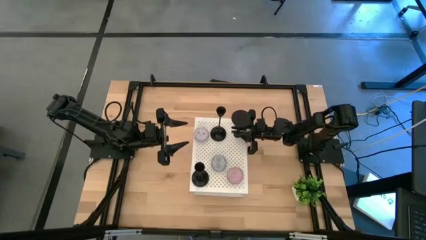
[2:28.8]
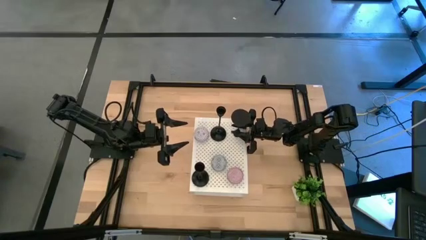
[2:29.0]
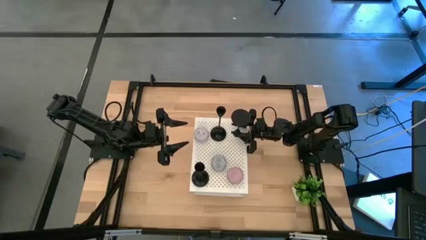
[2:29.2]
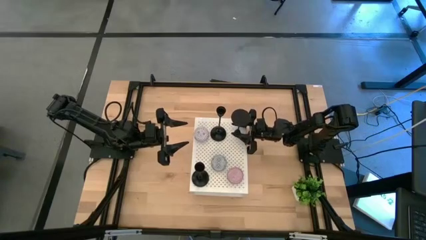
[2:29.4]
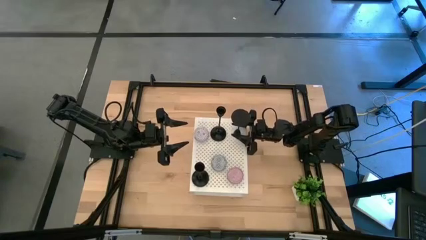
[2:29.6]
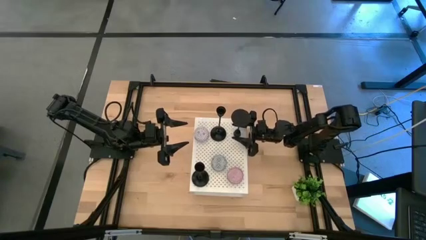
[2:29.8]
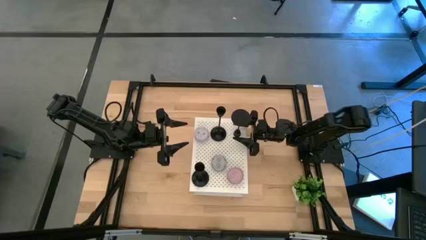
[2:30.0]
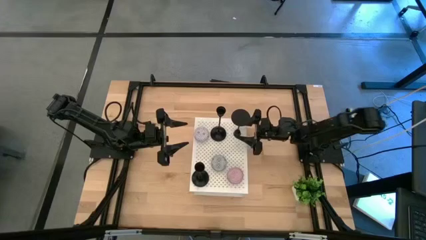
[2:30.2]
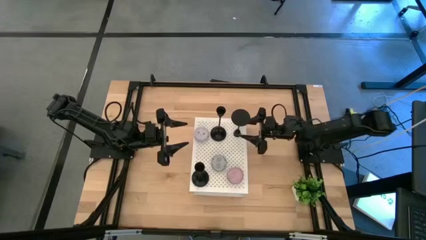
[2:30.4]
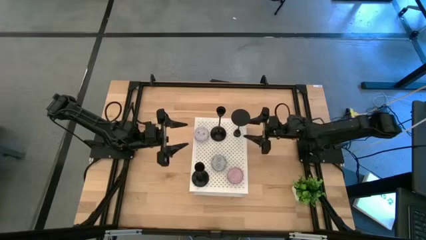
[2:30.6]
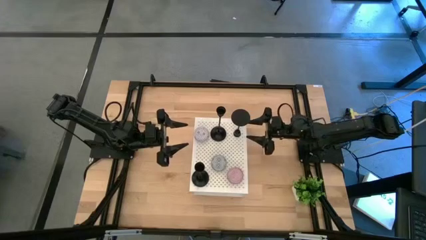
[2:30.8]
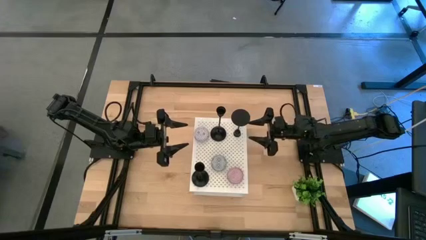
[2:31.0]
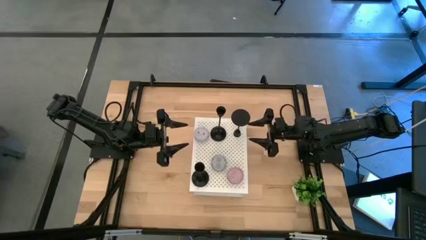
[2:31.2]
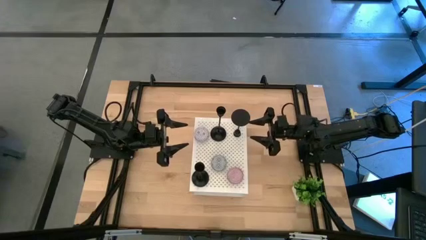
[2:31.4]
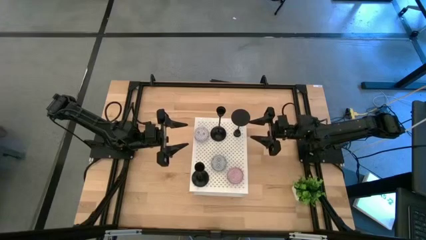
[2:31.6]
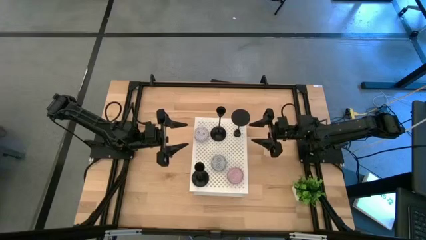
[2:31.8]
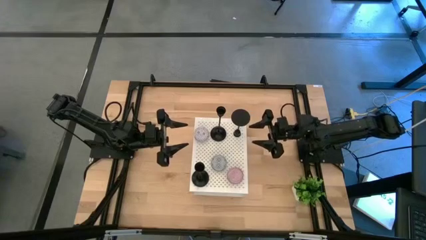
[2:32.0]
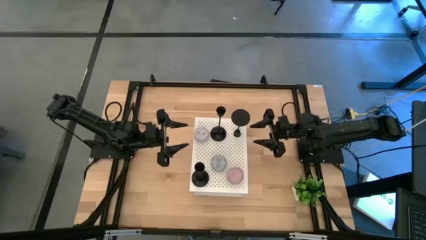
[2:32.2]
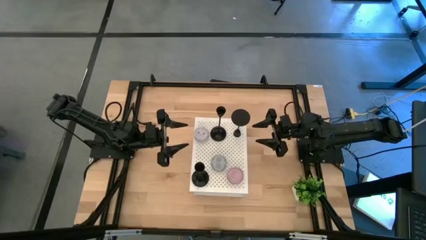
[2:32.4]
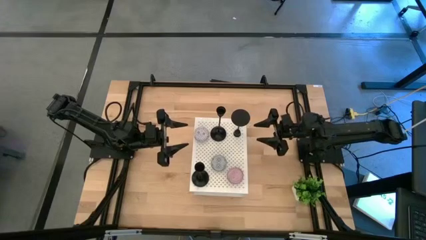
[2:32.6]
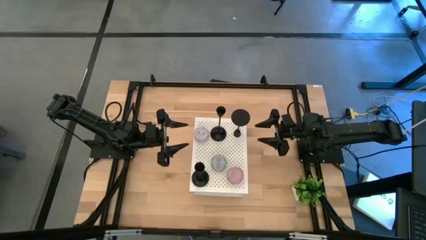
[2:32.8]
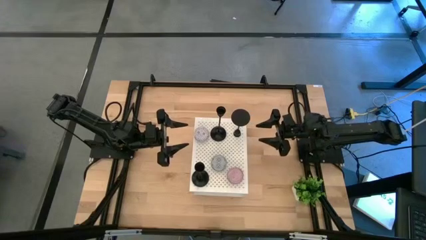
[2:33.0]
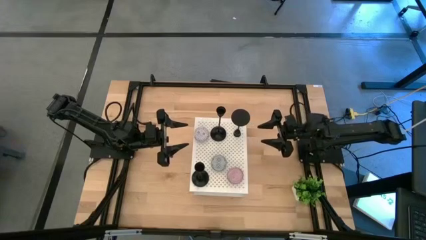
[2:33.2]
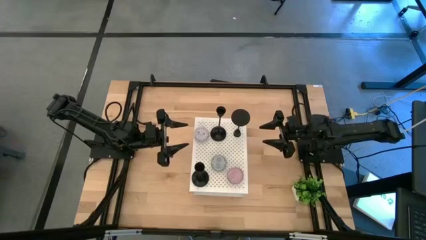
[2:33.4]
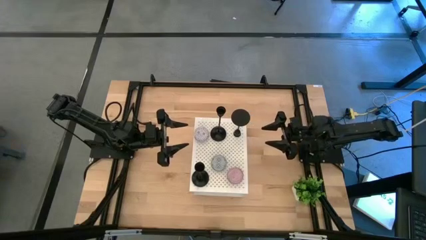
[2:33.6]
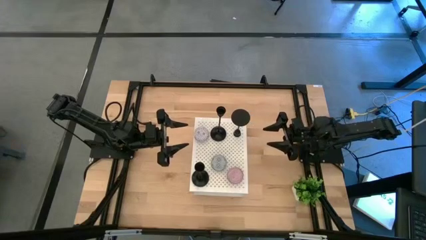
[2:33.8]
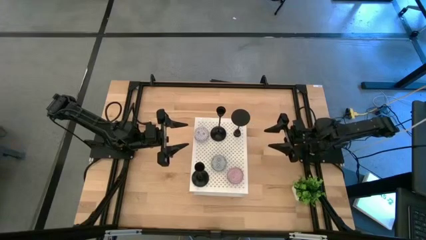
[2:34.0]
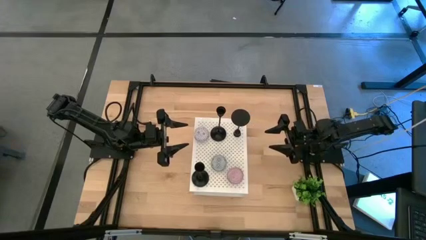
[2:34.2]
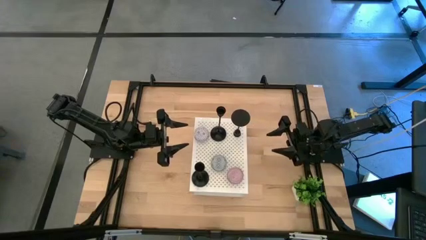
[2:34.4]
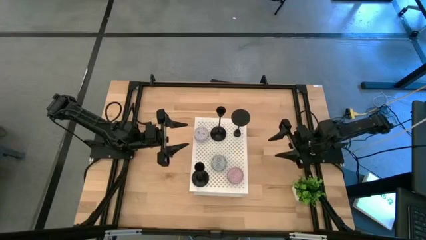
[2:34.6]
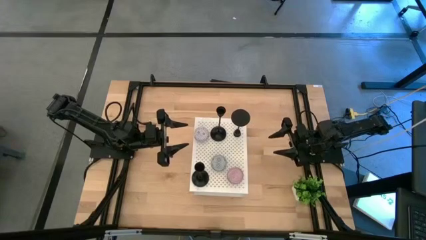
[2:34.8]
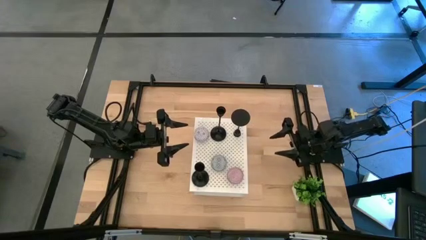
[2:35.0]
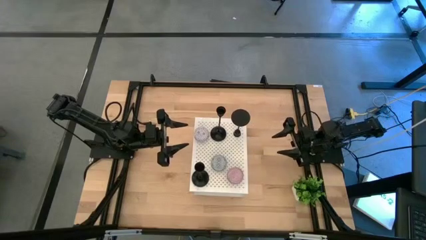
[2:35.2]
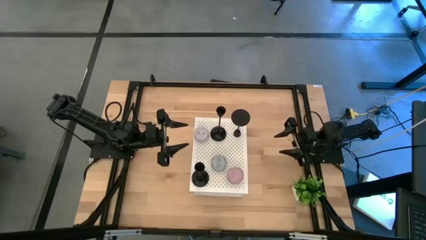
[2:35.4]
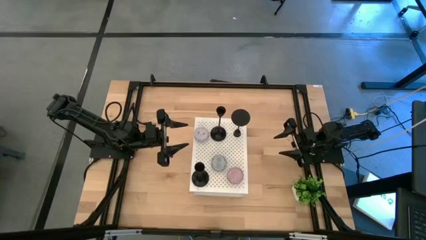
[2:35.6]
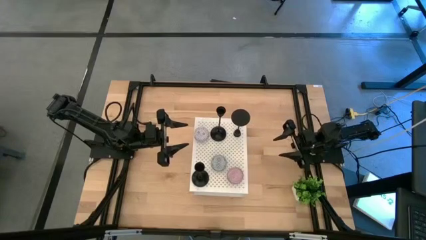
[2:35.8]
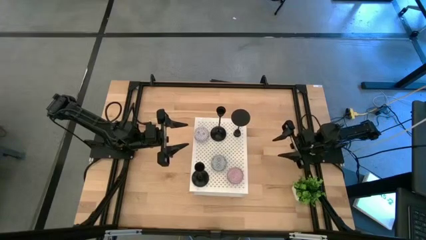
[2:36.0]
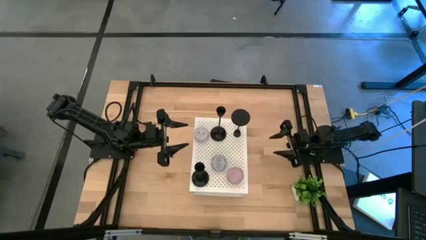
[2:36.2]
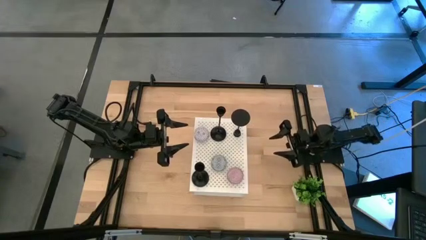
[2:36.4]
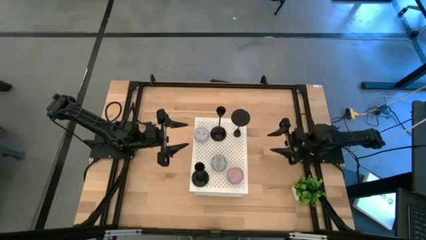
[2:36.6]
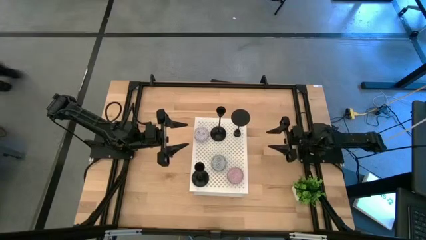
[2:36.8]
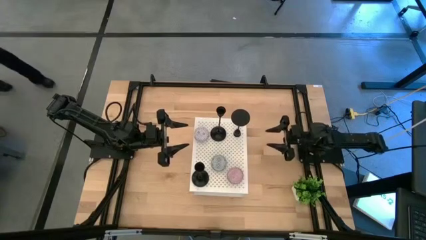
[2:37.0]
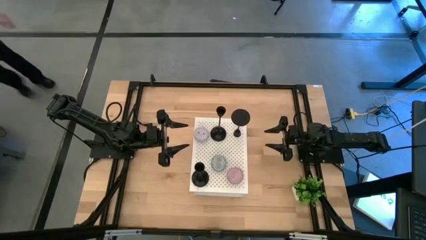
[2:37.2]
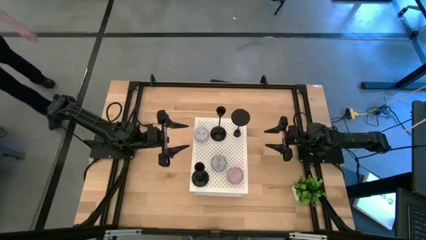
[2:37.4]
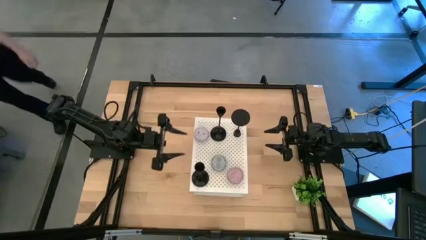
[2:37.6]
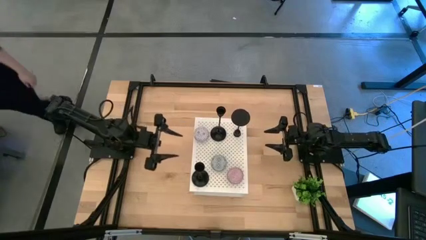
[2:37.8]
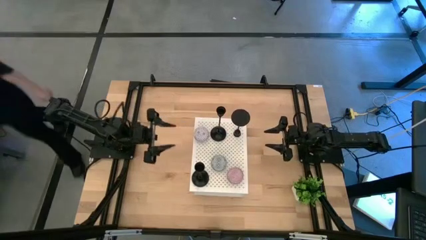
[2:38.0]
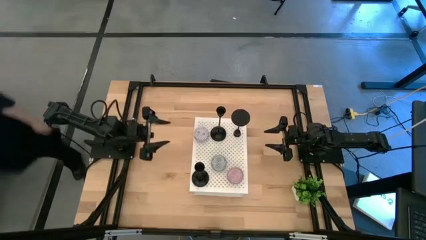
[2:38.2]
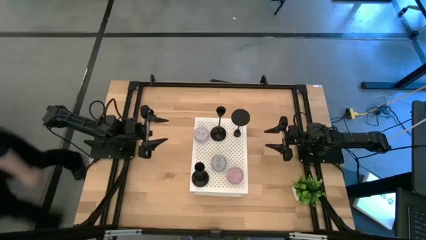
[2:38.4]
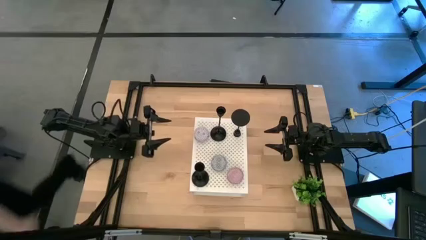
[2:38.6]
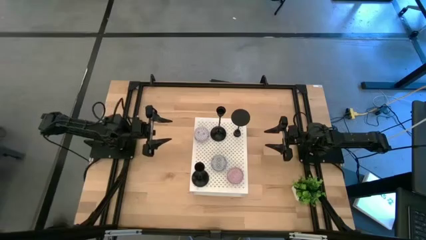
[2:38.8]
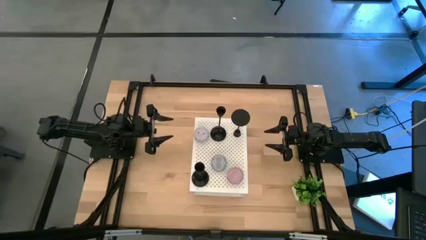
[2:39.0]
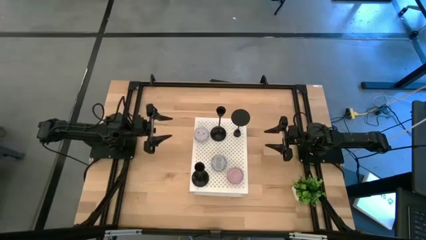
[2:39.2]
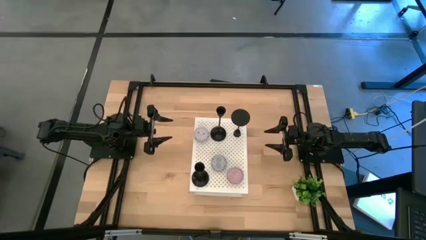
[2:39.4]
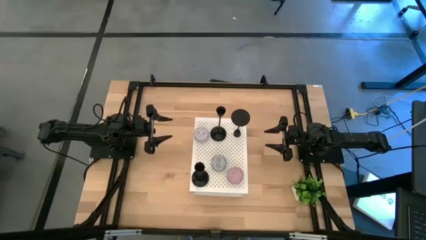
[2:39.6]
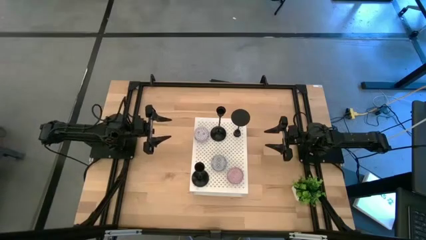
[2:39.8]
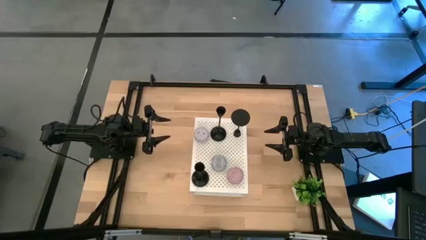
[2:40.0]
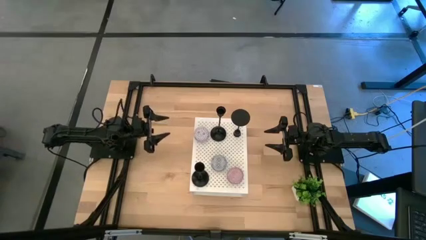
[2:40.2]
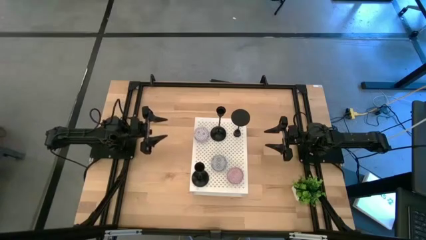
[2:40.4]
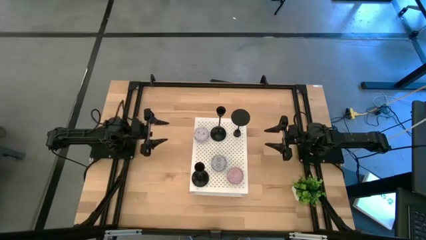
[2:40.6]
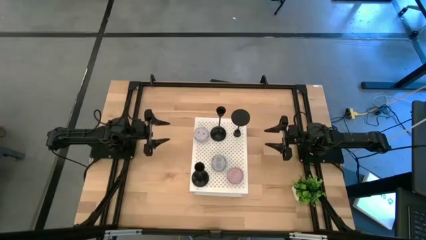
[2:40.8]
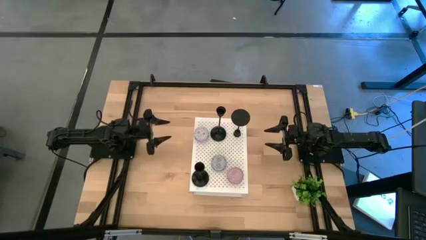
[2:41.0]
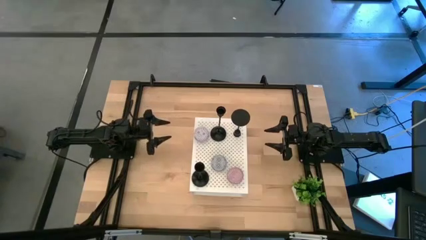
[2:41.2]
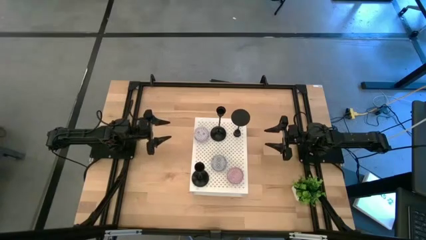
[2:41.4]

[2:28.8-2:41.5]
Task: Pick & Place candle stick holders
Return to Home Position
